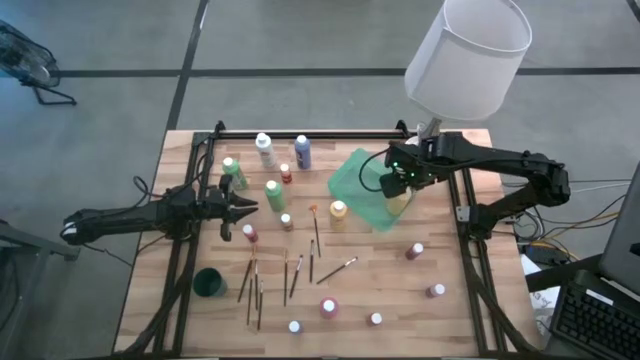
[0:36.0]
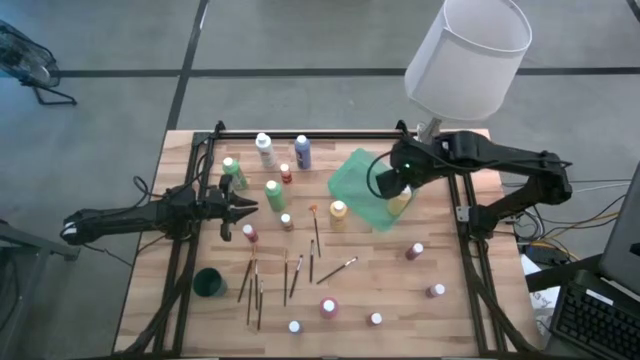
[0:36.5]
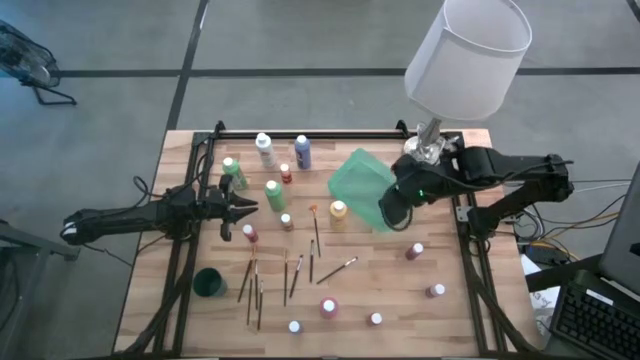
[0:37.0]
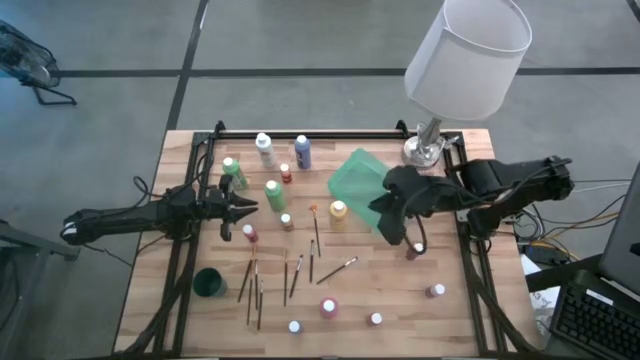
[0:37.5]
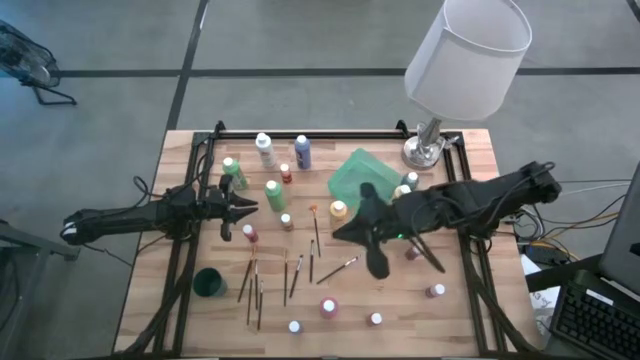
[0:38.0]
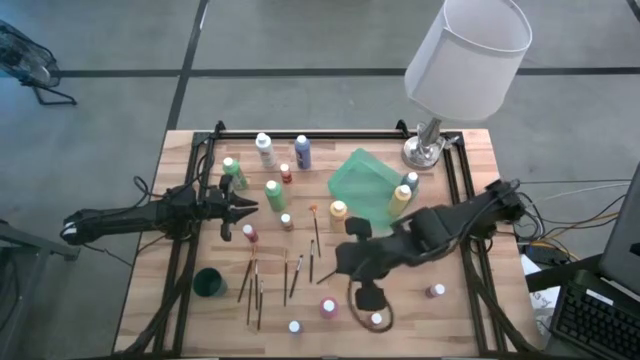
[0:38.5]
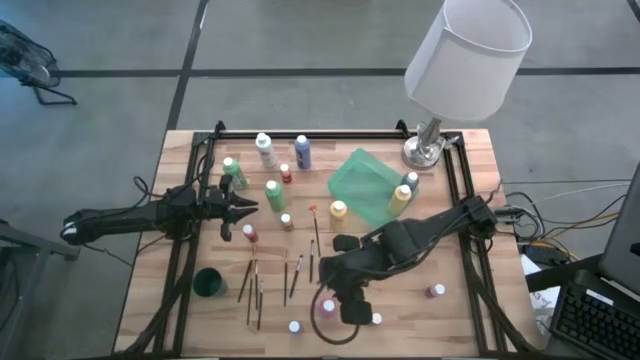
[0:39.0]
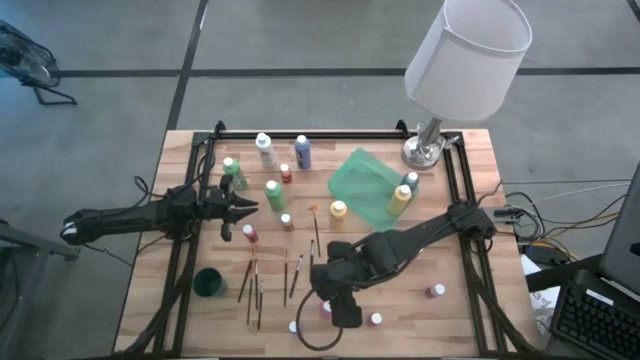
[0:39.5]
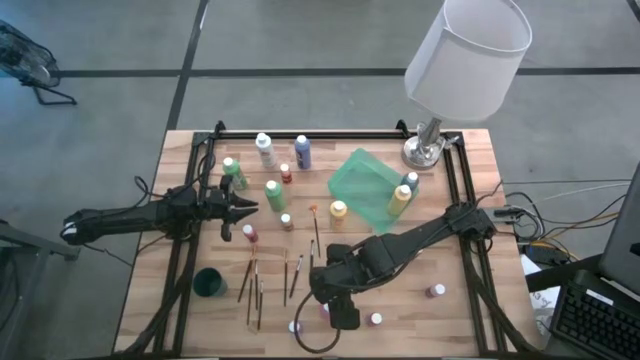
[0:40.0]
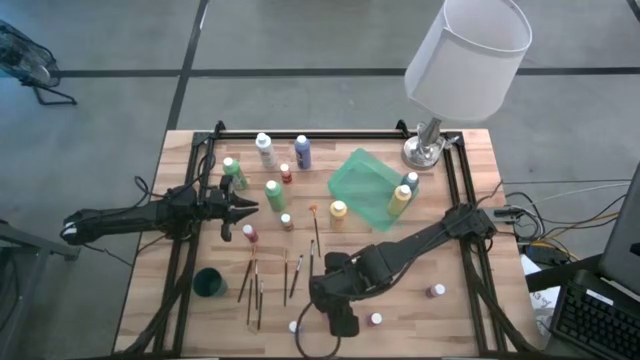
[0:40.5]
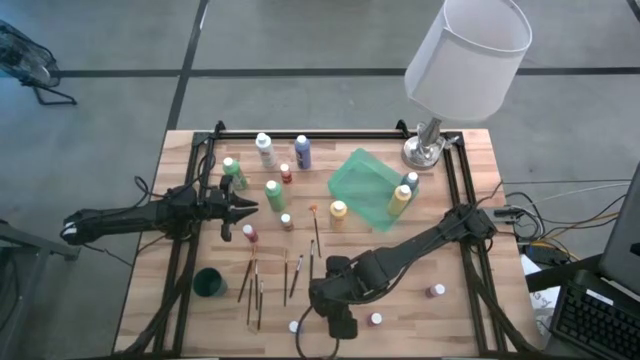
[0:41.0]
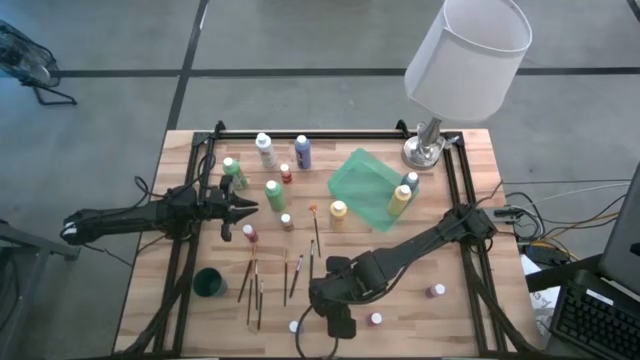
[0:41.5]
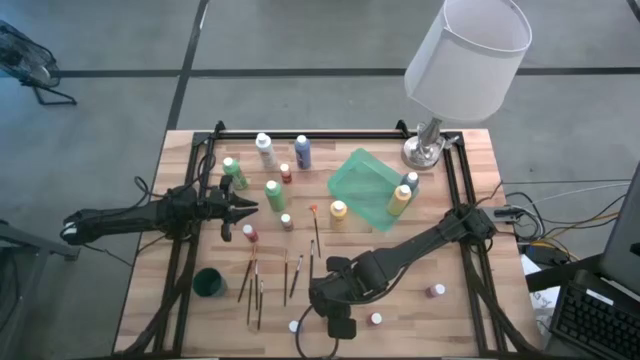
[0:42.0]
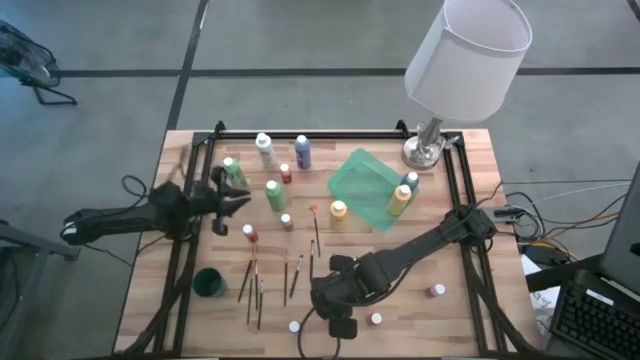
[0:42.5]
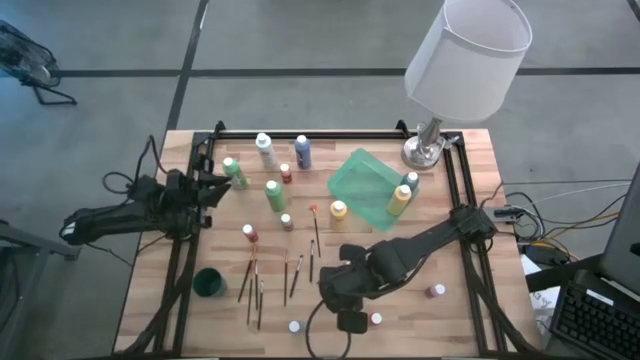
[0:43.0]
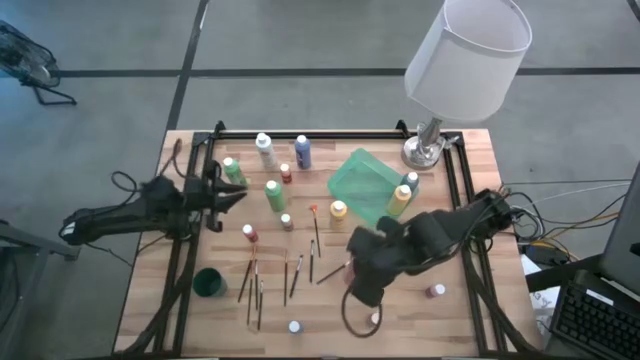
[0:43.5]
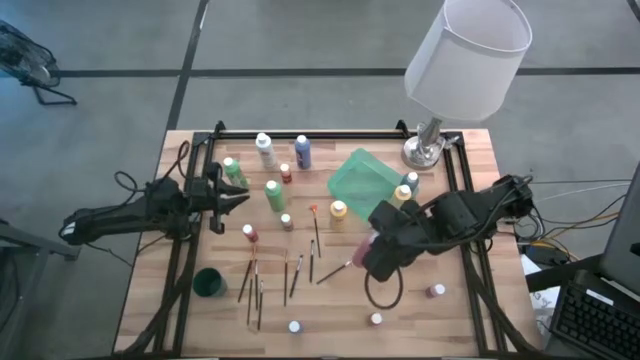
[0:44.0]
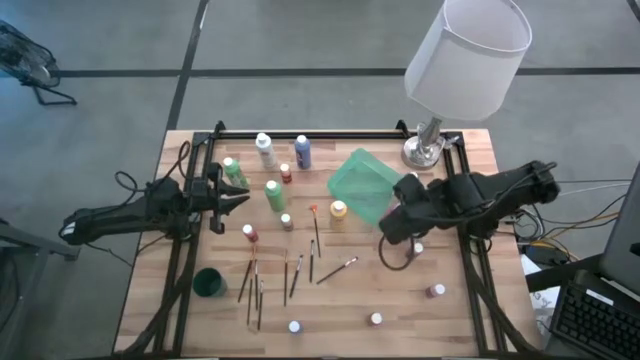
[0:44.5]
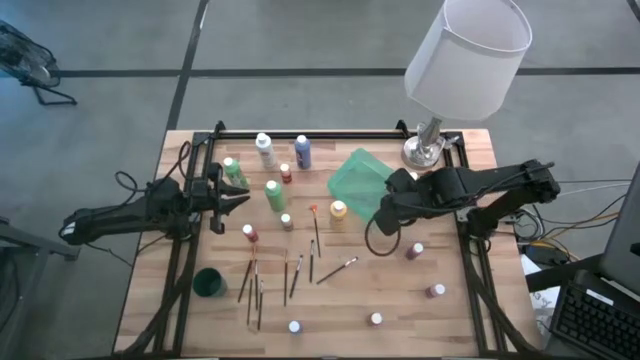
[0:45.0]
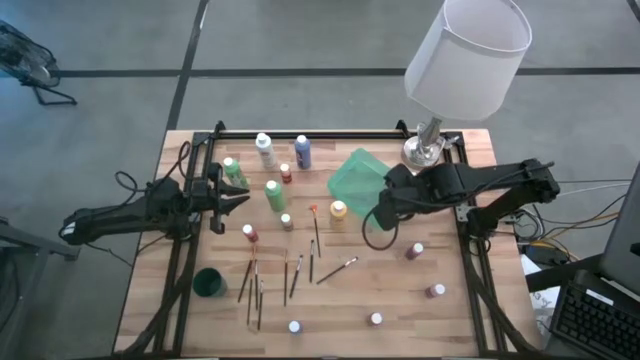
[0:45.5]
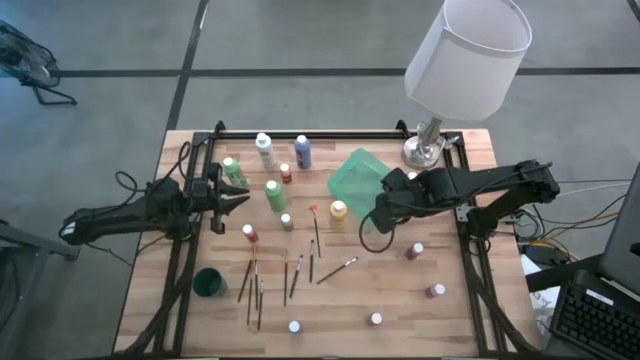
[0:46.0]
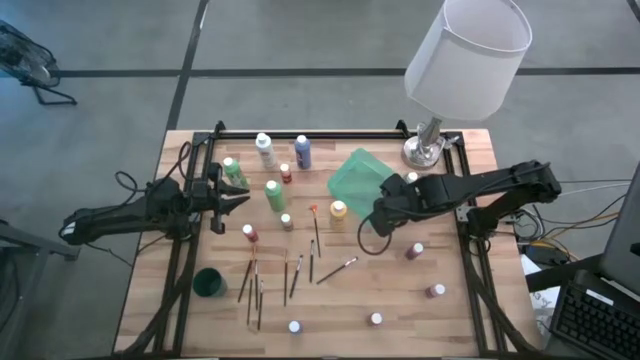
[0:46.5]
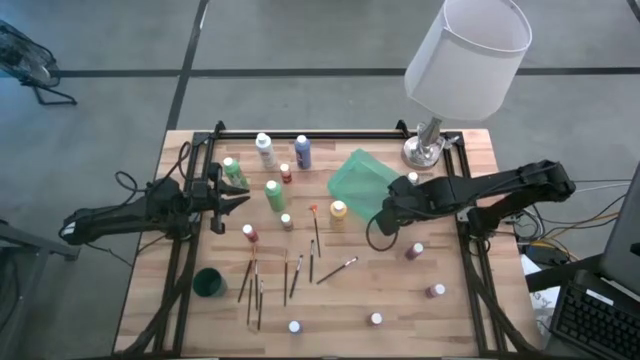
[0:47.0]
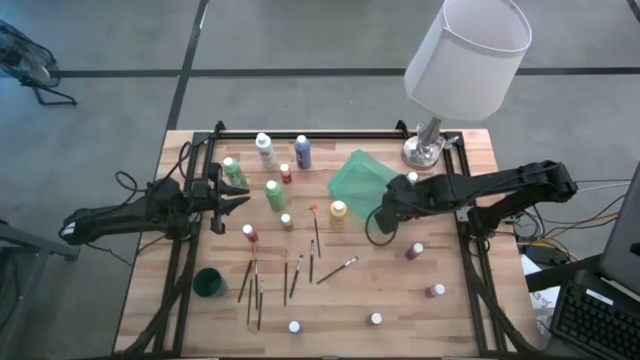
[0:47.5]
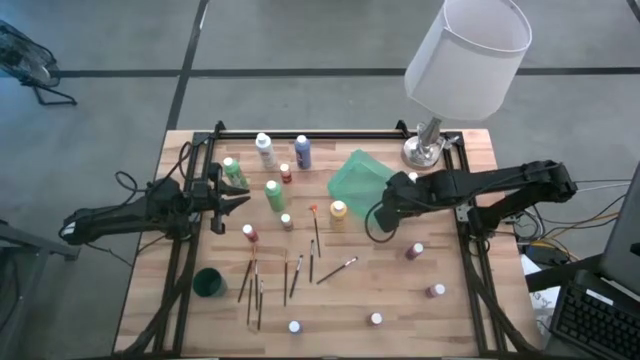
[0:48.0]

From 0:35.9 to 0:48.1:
Task: Pick & Place Paint Supplies
Put the big pink paint bottle into the green bin

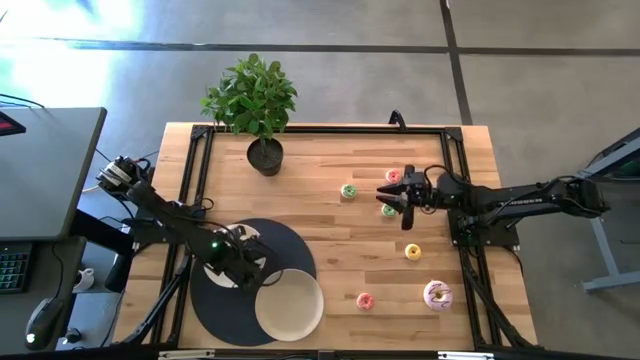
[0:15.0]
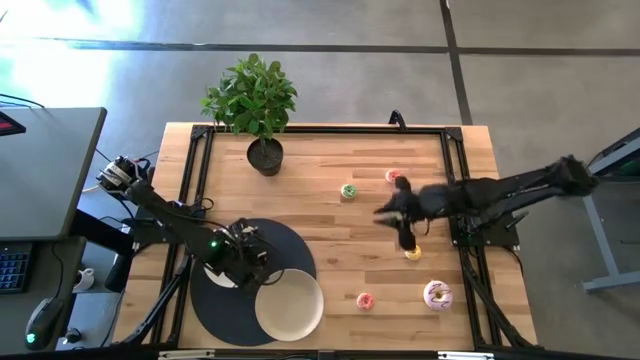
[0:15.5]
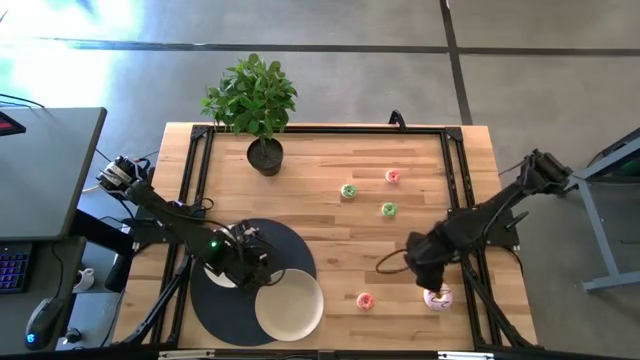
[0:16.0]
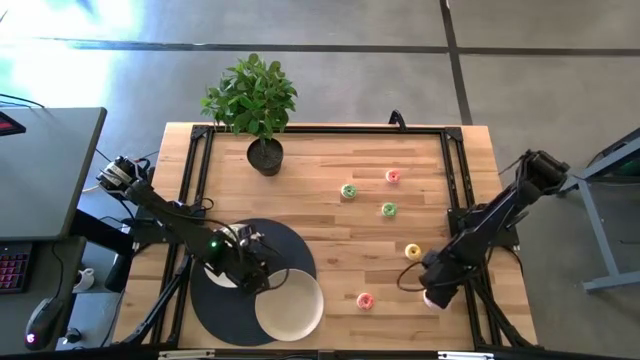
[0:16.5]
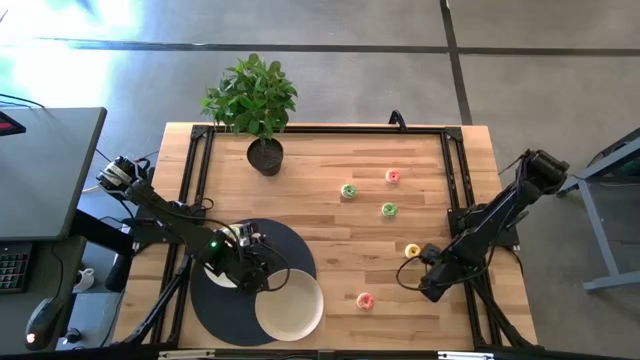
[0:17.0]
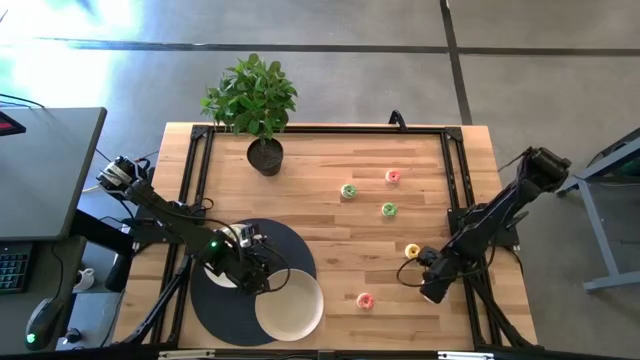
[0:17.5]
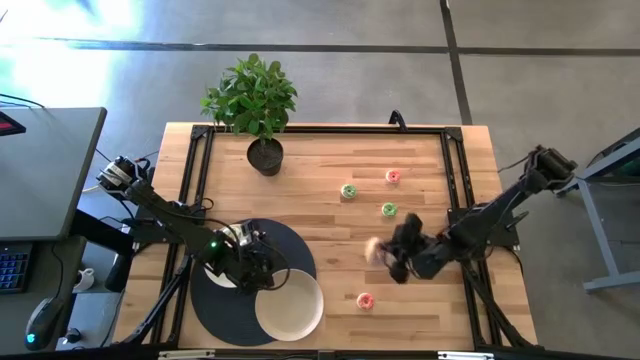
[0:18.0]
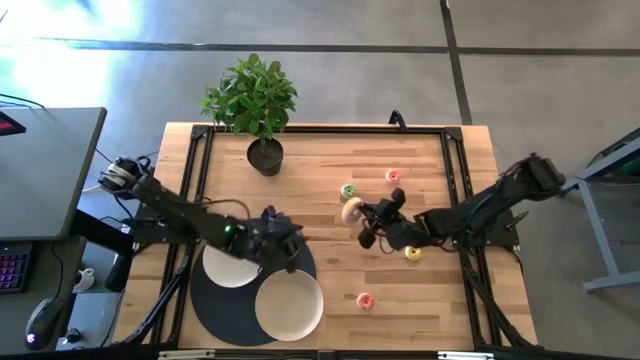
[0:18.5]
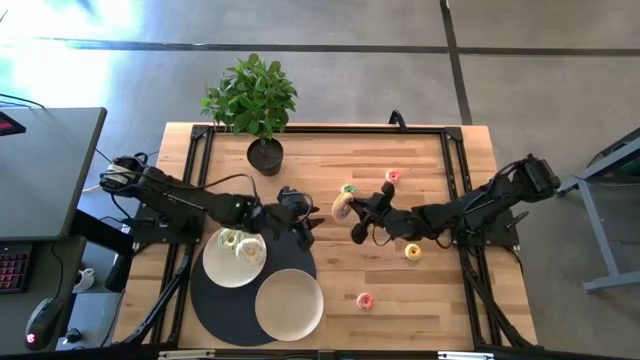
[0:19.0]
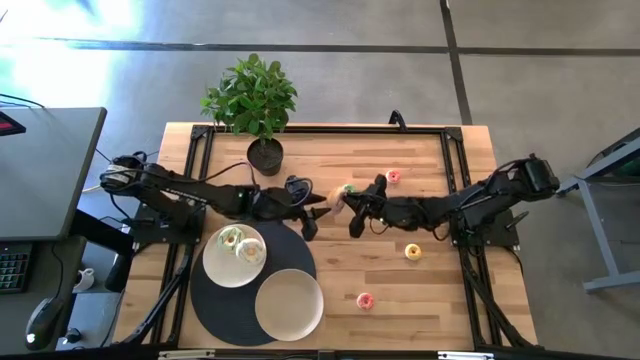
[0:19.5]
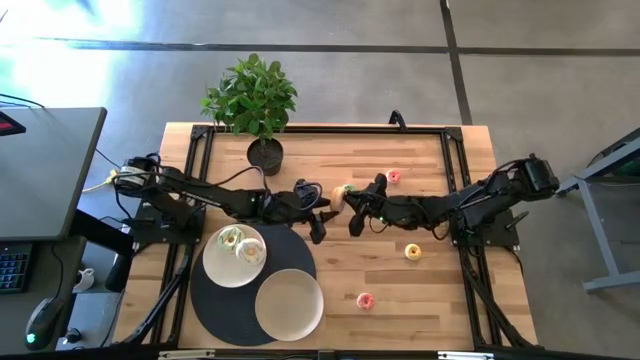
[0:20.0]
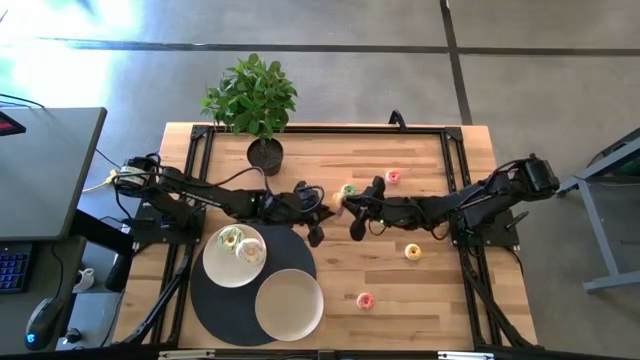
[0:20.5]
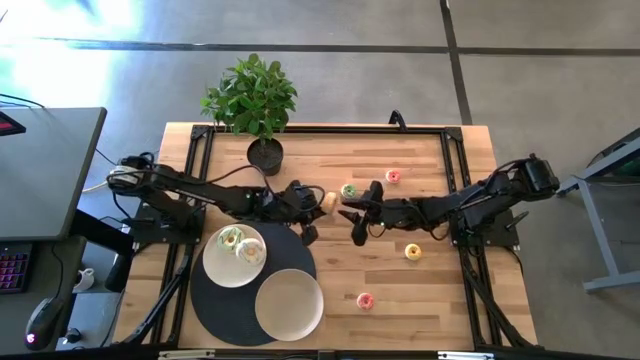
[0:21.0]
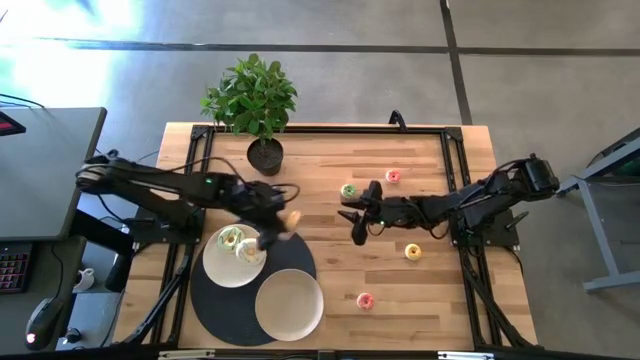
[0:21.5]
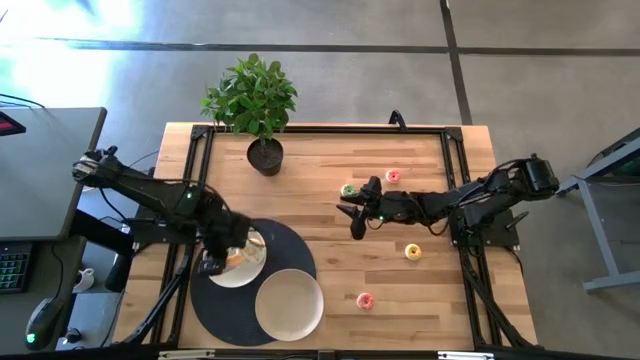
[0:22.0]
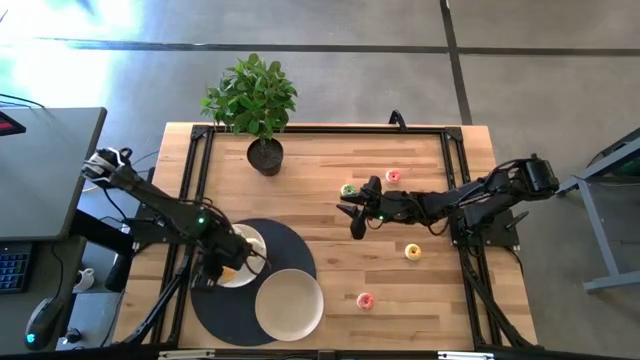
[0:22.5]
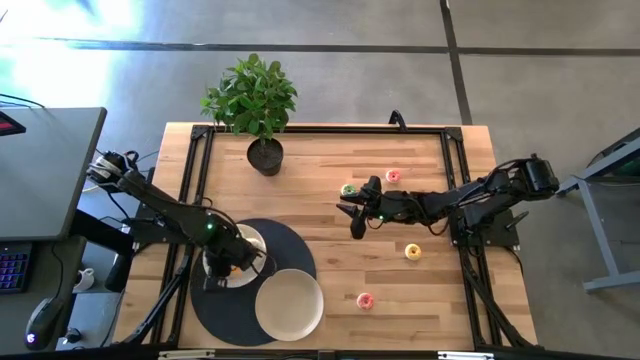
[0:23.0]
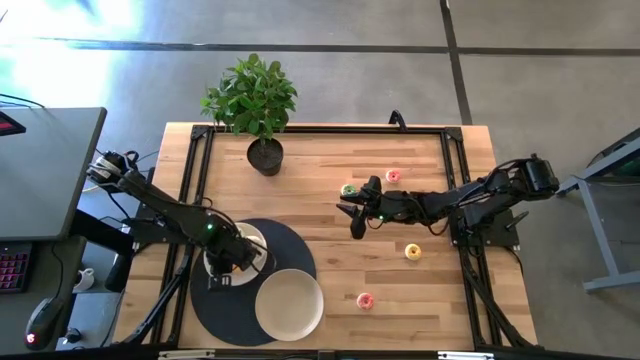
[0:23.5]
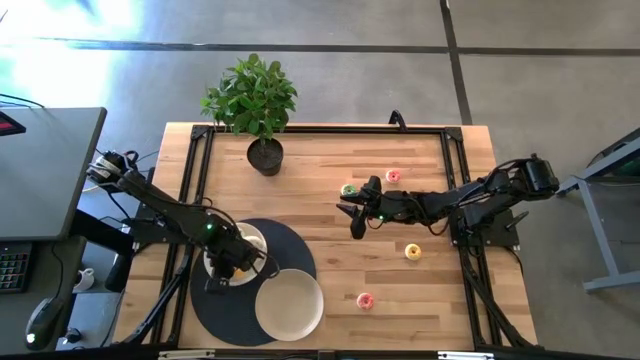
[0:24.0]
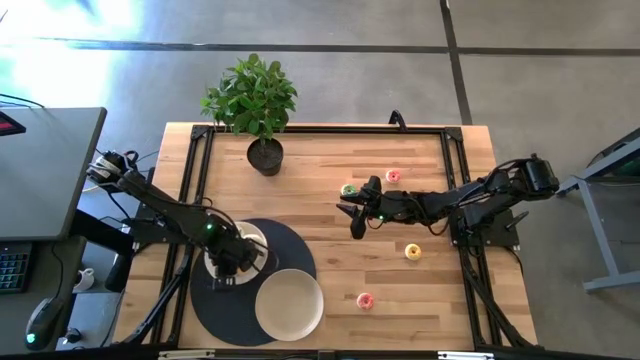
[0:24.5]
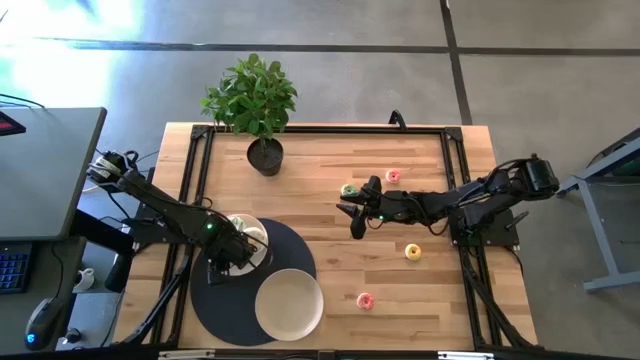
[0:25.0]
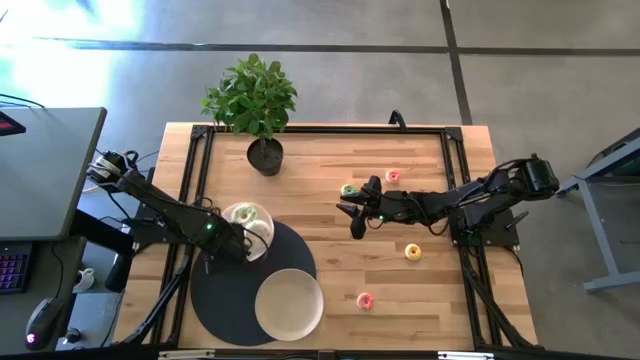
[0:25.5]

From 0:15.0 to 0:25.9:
Task: Pick & Place donuts
Put the large violet donut on the white plate
